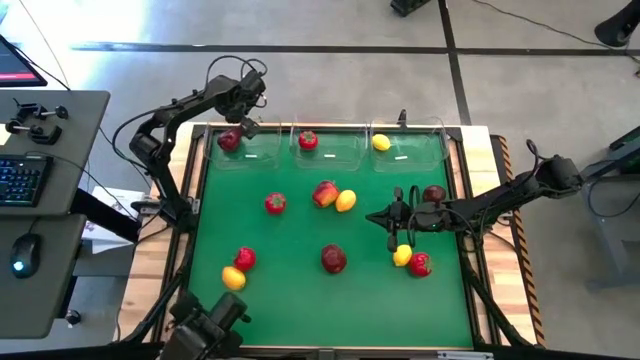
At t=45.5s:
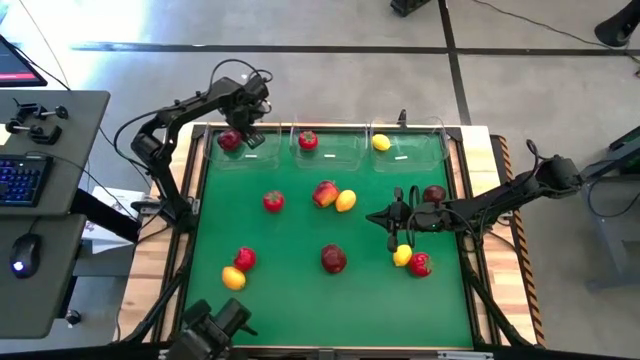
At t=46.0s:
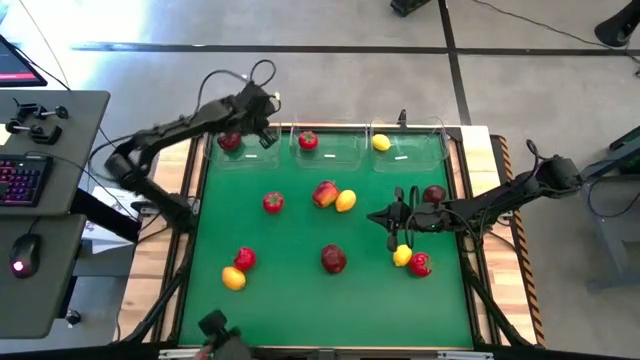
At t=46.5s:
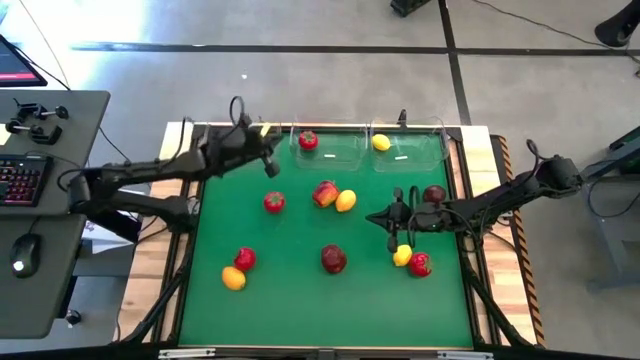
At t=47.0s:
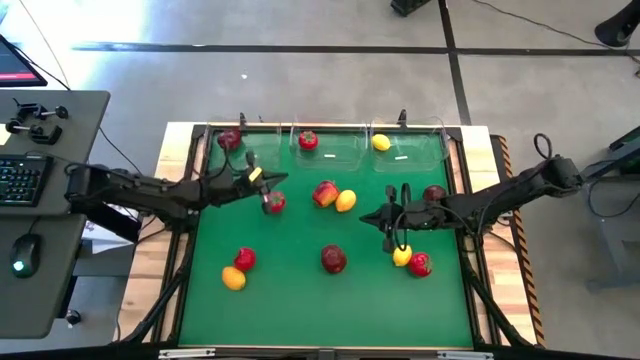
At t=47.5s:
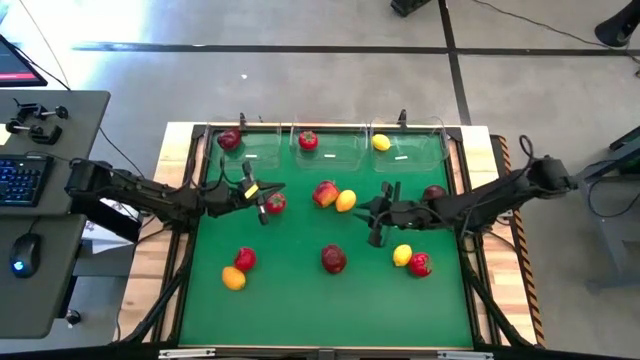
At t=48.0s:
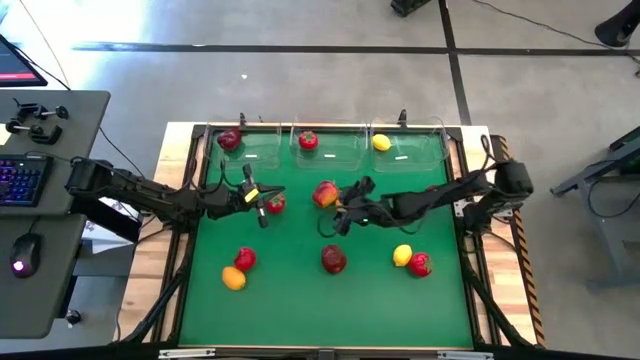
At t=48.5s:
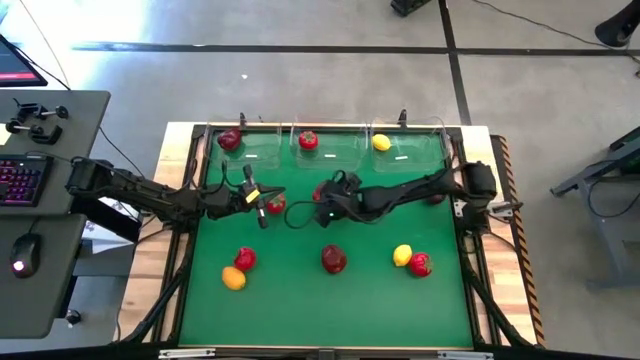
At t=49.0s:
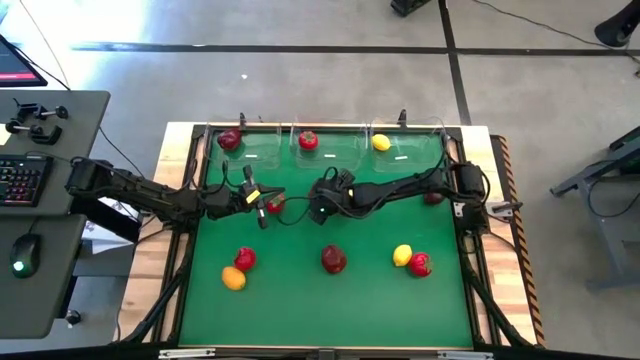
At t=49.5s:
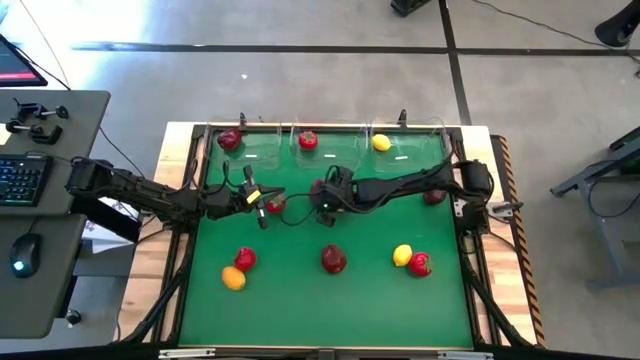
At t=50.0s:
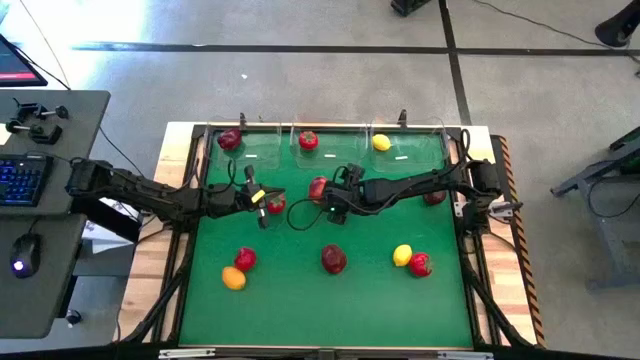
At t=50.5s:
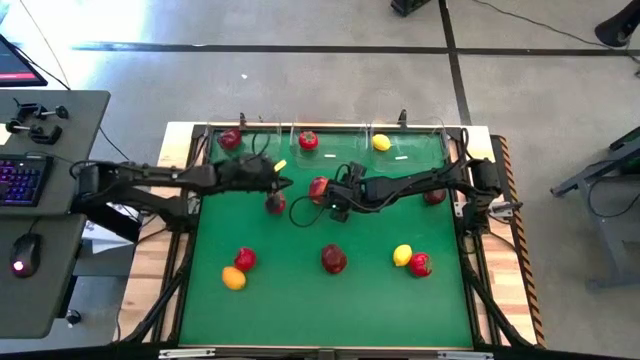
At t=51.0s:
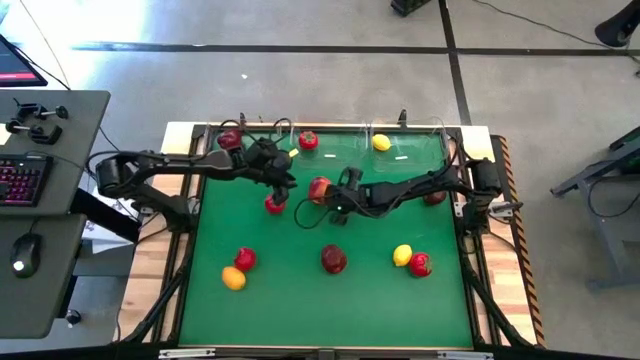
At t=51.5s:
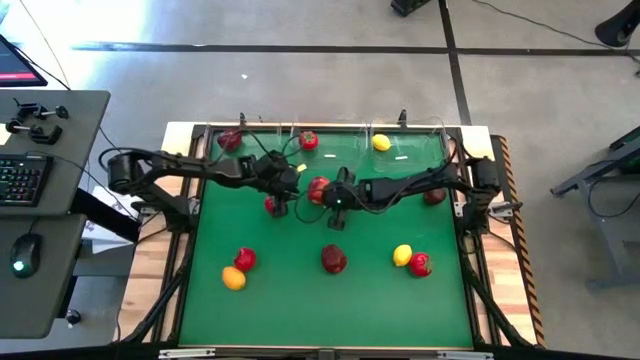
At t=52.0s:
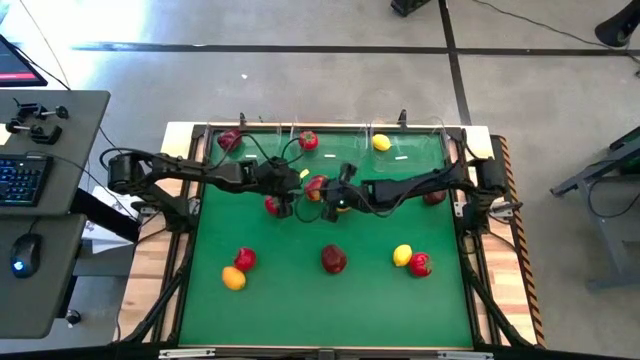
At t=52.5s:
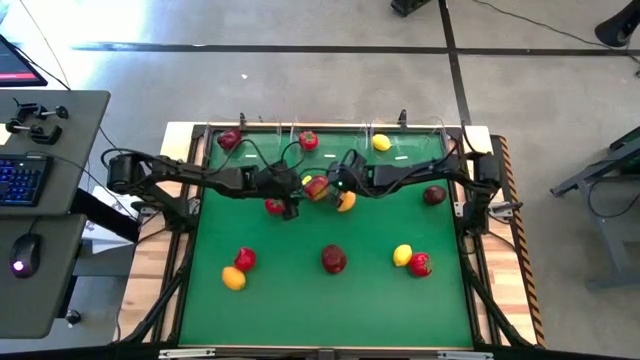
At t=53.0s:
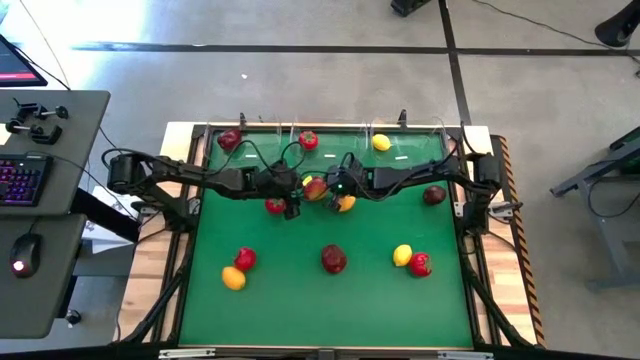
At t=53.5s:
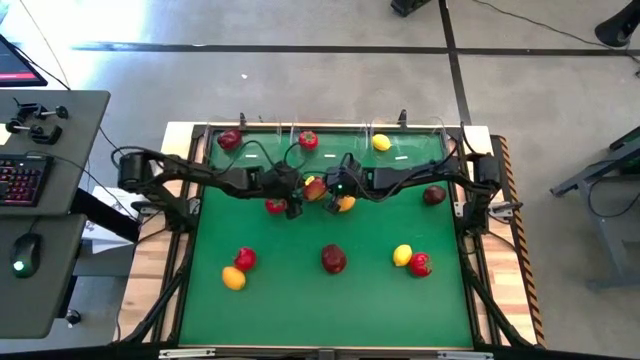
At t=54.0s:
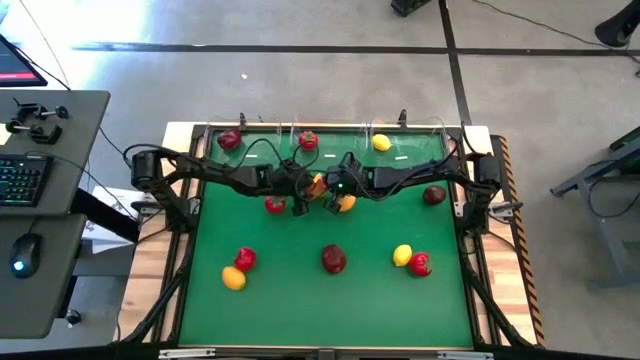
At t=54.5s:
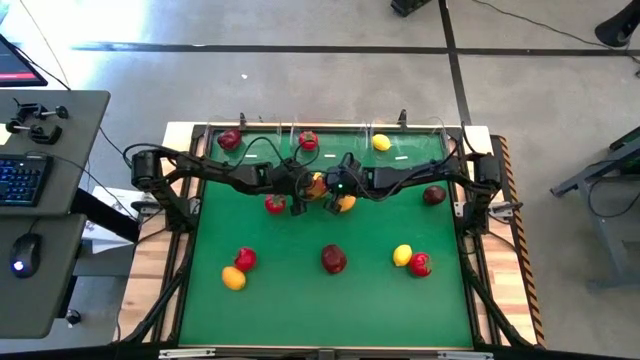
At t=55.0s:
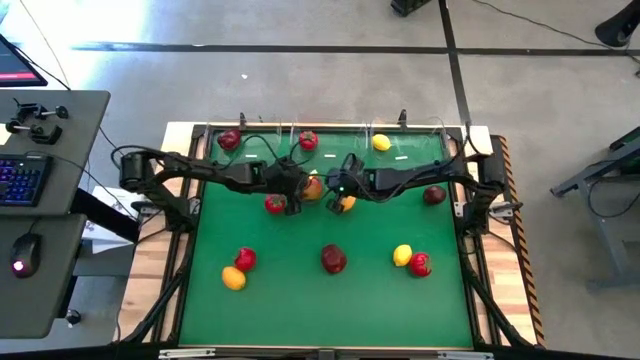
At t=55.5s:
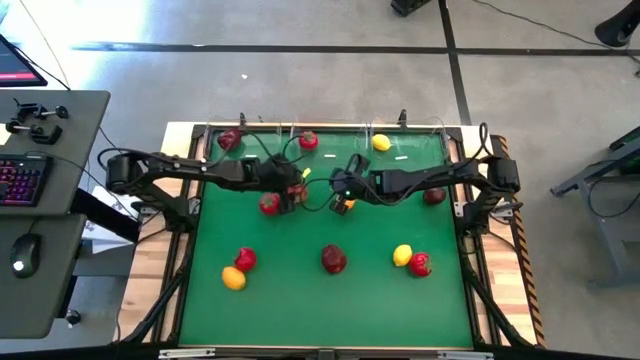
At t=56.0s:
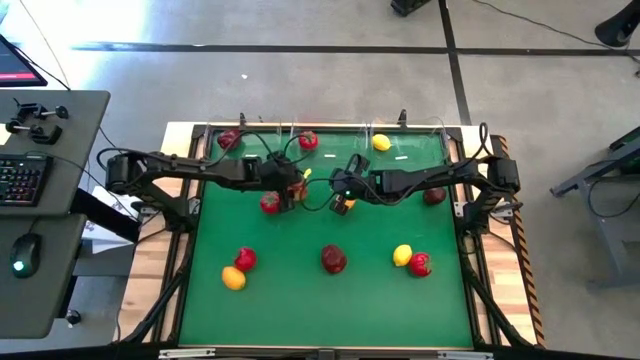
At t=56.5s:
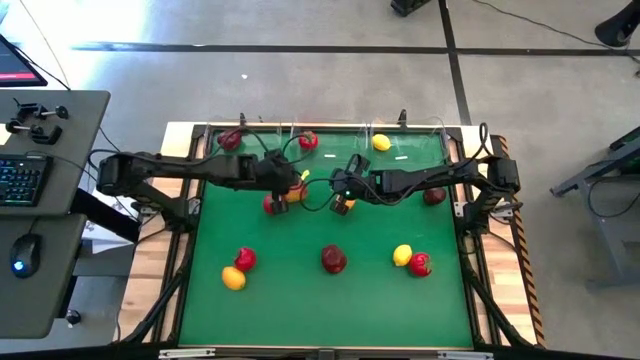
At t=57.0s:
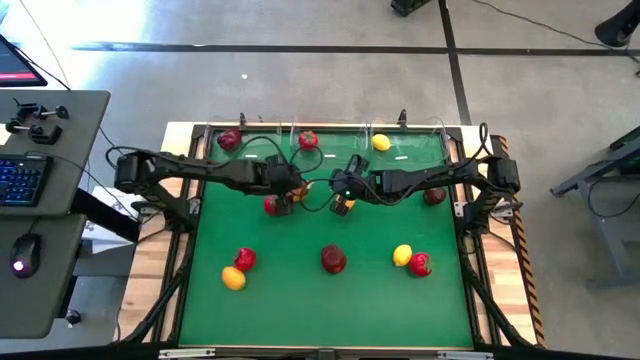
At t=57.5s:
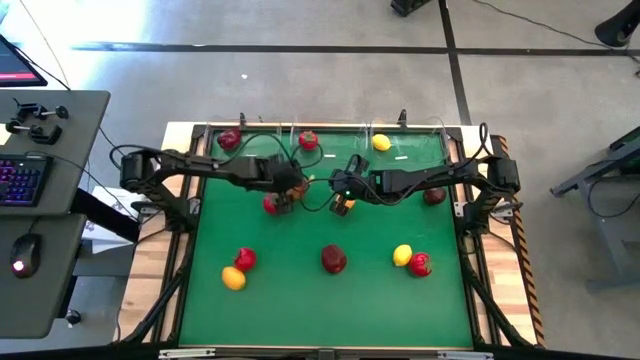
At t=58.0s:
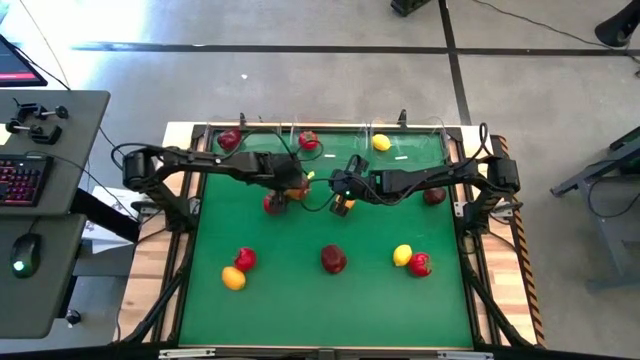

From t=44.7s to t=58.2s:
Task: Sort produce into baskets
Put the top left apple into the left transparent bin

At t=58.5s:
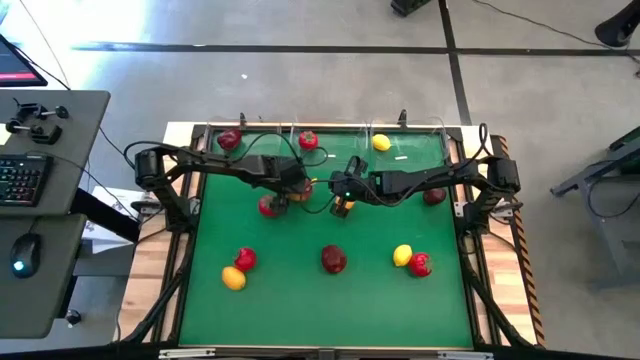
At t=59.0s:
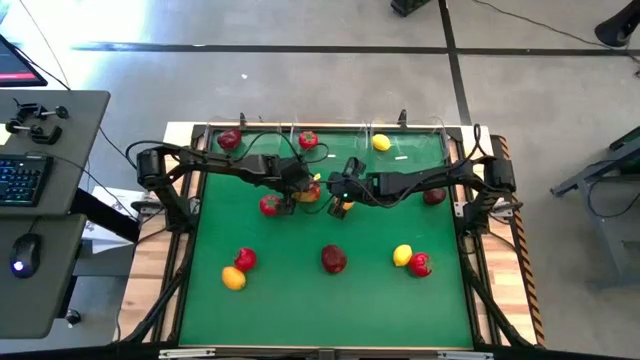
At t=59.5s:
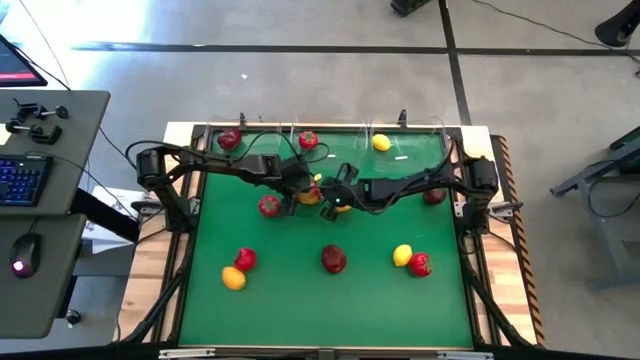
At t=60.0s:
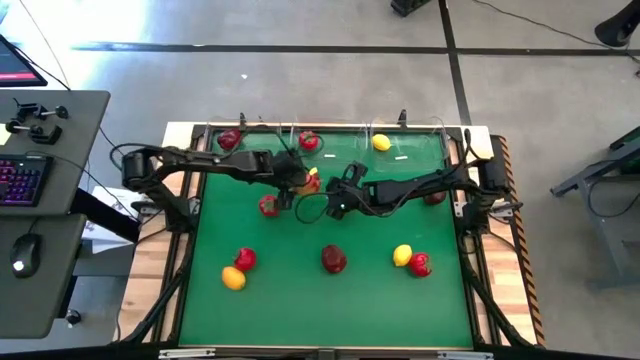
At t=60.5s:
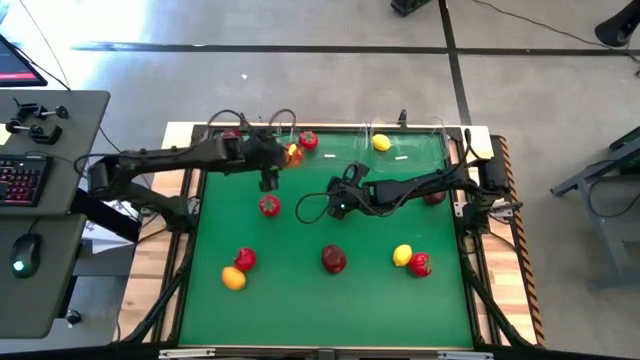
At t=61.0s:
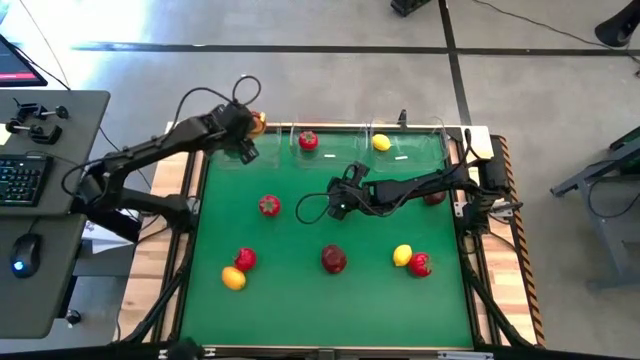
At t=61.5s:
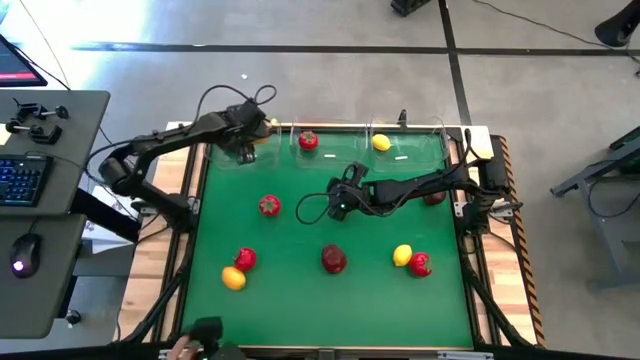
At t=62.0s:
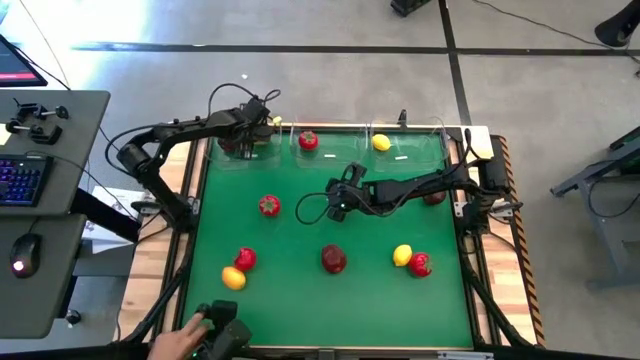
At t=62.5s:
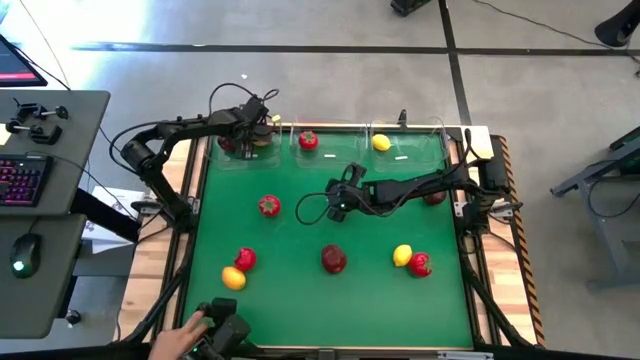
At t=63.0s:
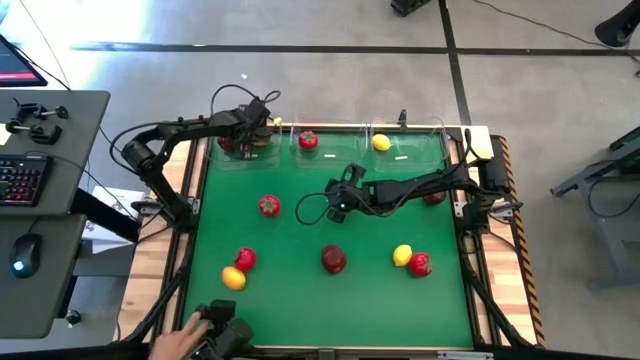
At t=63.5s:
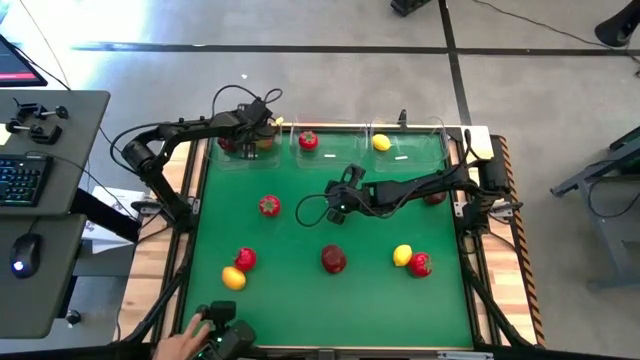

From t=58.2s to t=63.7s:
Put the top left apple into the left transparent bin

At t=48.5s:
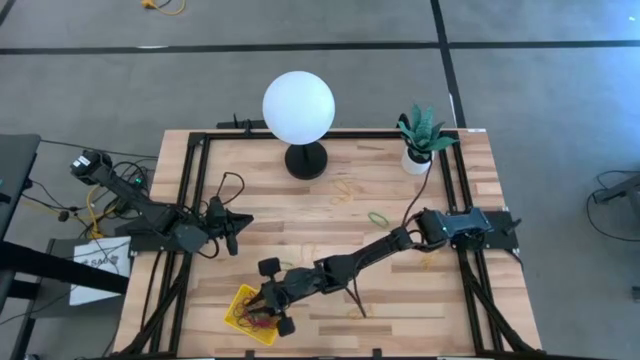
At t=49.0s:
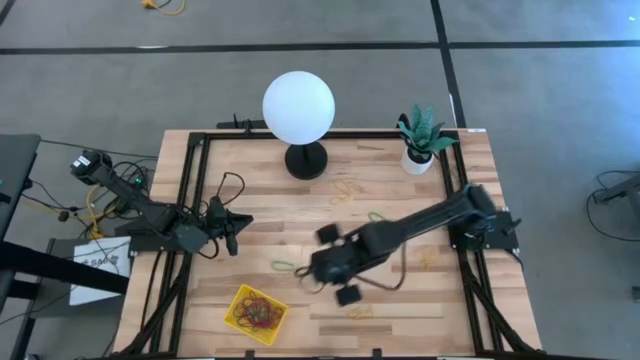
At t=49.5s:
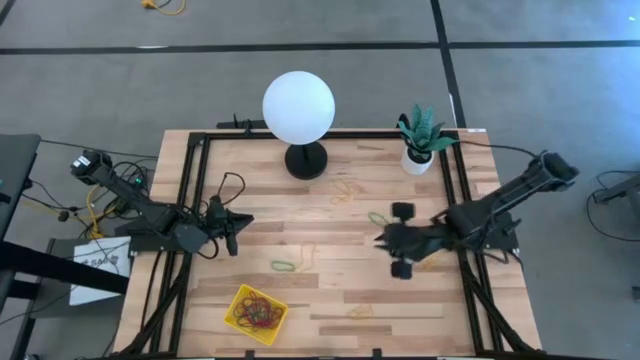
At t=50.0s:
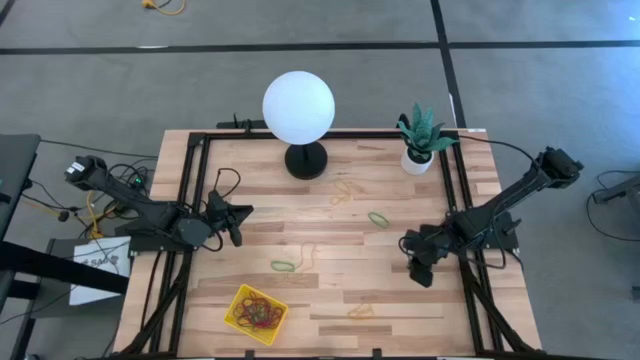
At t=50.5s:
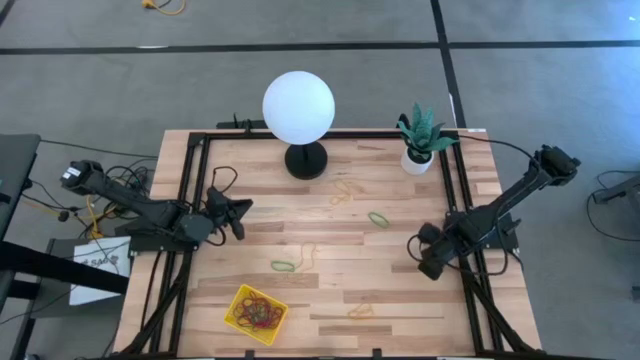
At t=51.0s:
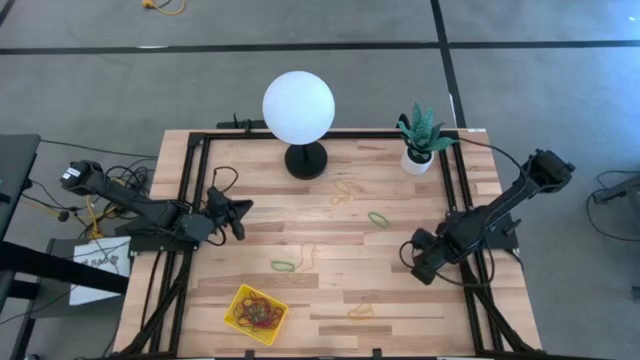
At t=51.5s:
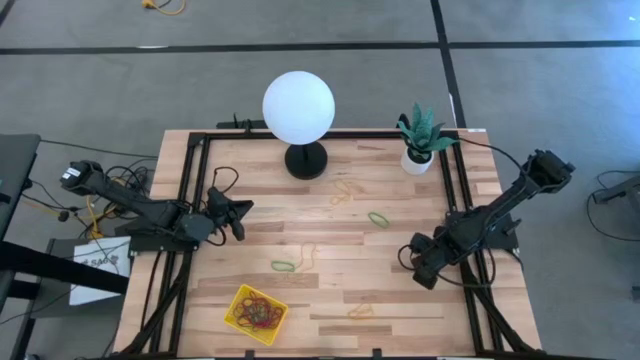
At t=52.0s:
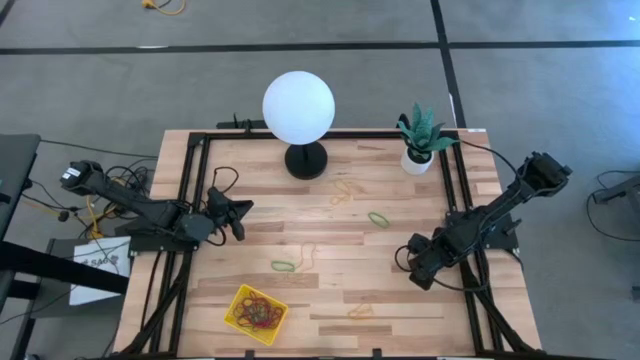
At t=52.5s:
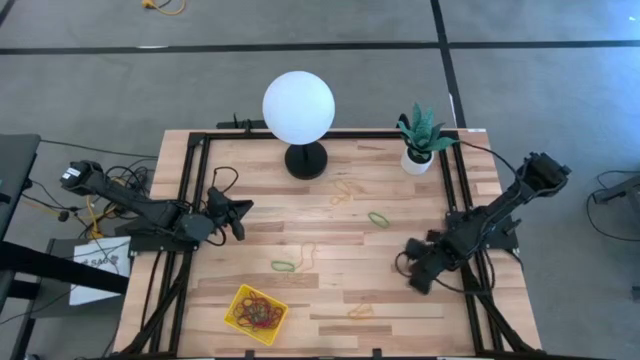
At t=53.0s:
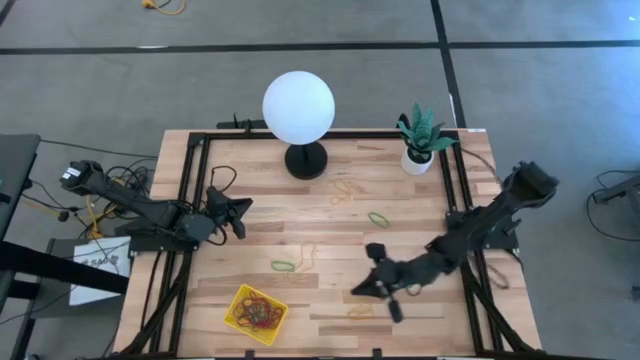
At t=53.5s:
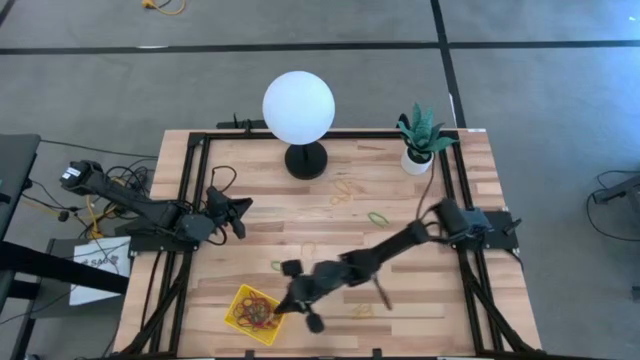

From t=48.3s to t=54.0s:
Task: Pick and place items into bin
Put the yellow rubber band into the yellow bin
